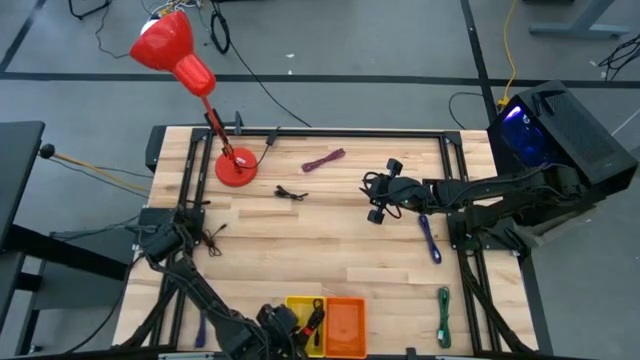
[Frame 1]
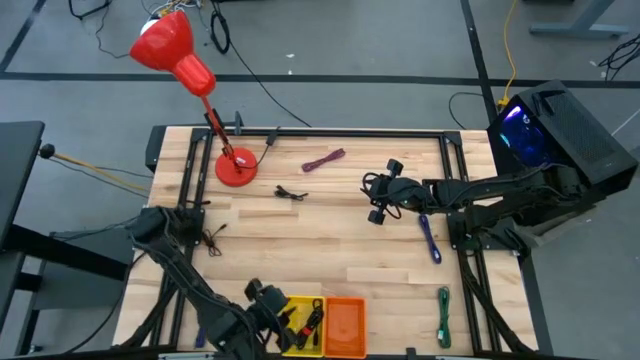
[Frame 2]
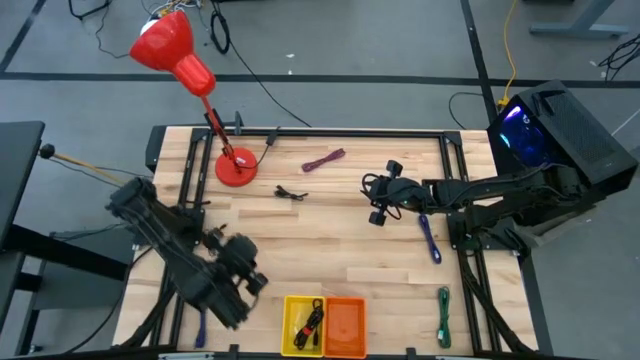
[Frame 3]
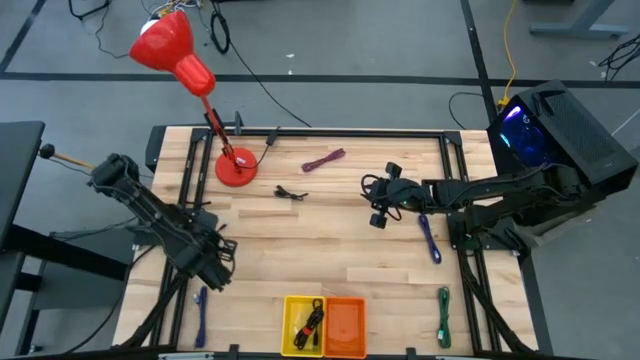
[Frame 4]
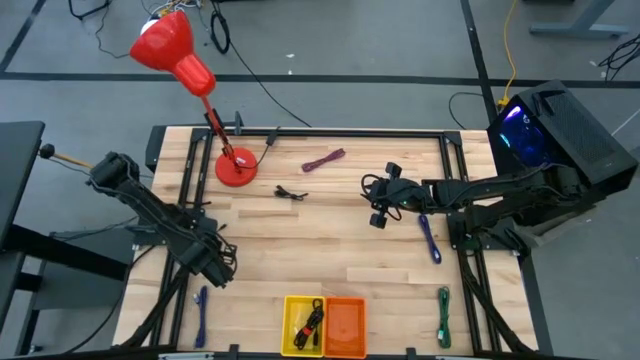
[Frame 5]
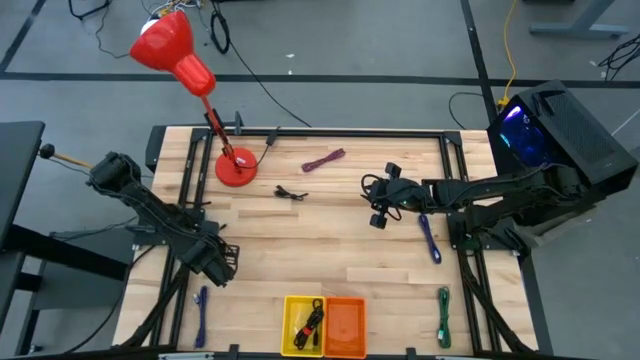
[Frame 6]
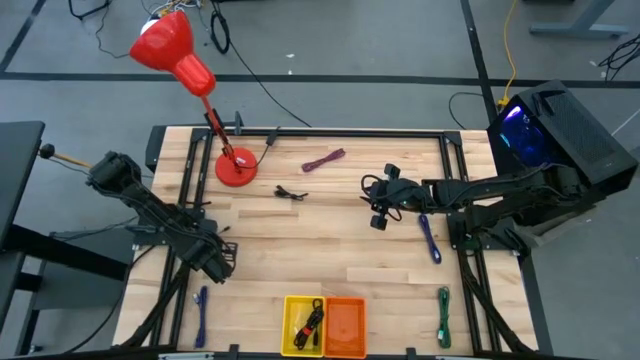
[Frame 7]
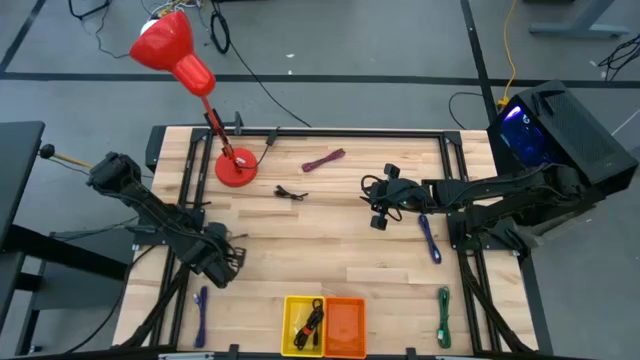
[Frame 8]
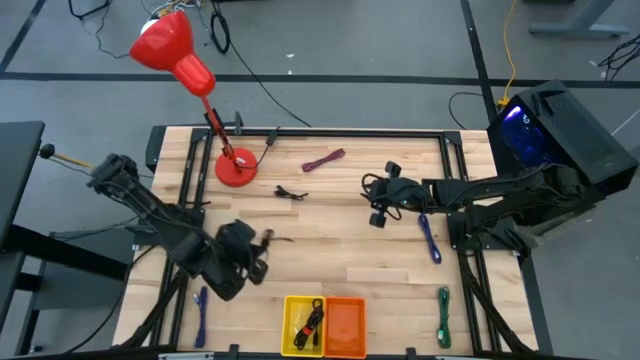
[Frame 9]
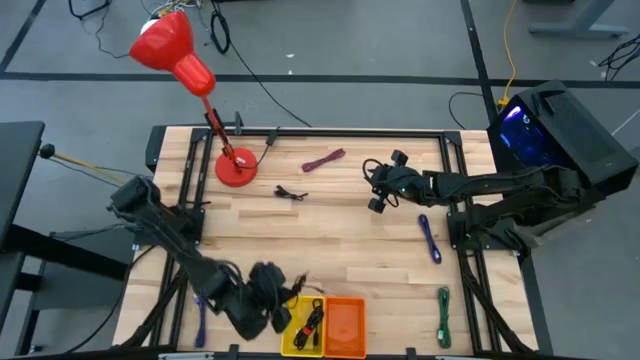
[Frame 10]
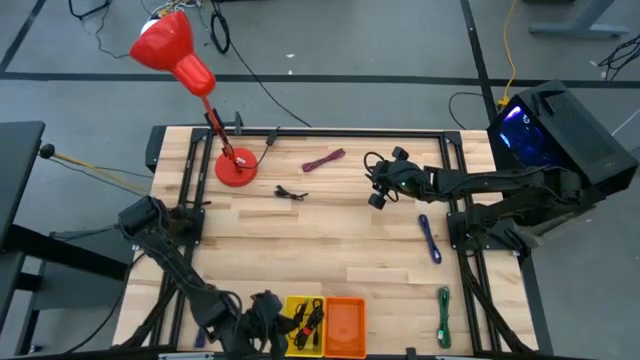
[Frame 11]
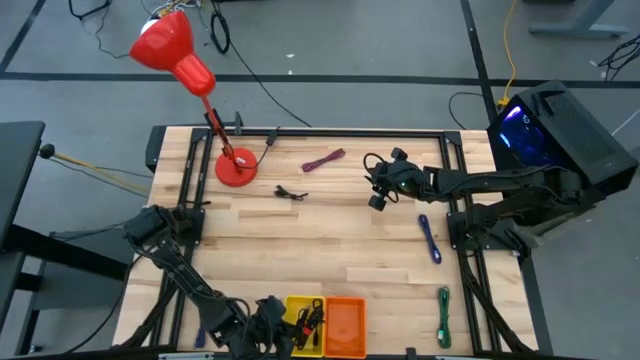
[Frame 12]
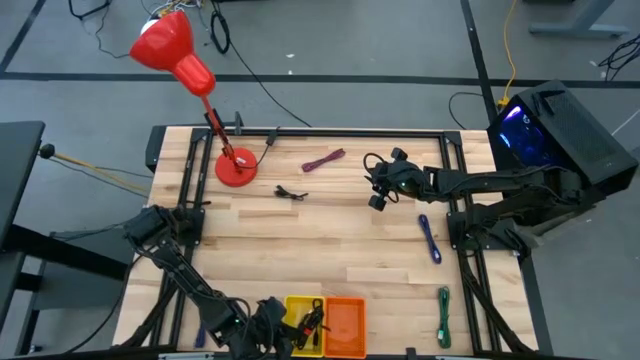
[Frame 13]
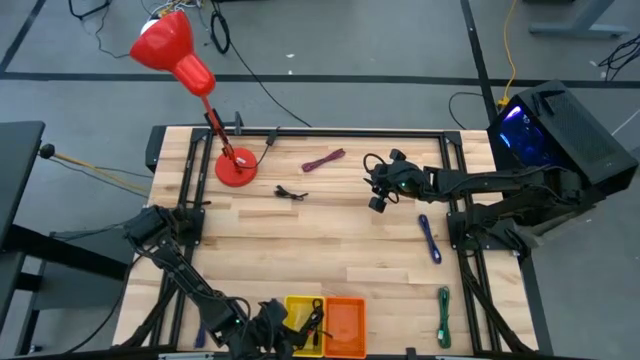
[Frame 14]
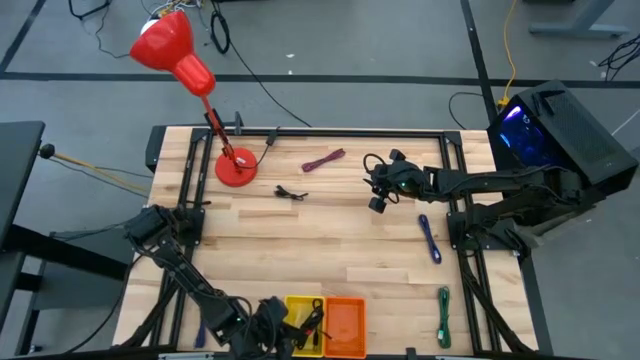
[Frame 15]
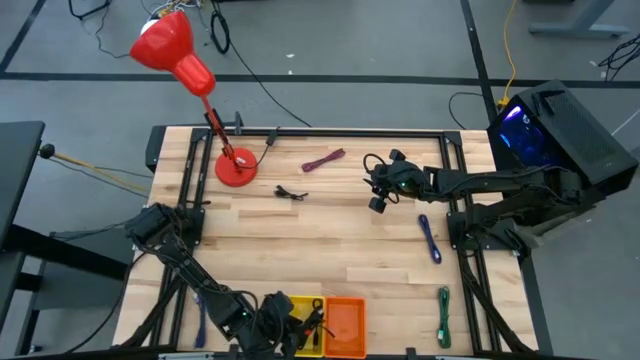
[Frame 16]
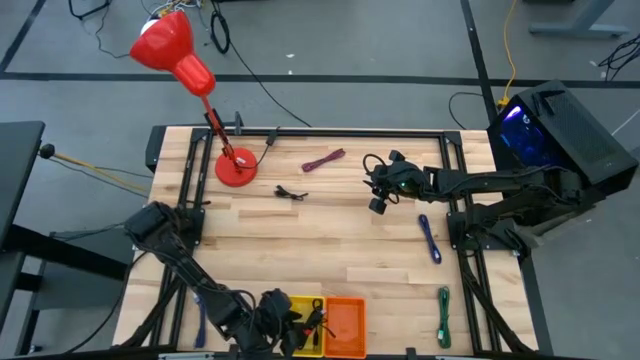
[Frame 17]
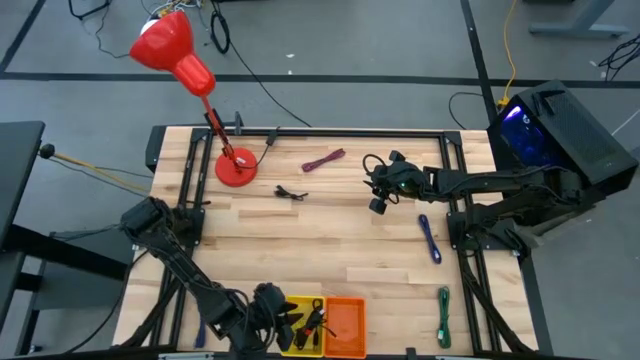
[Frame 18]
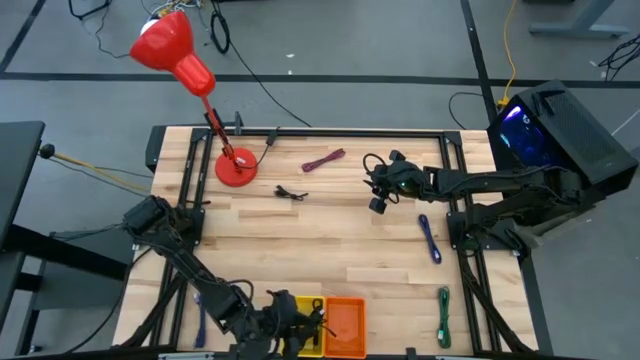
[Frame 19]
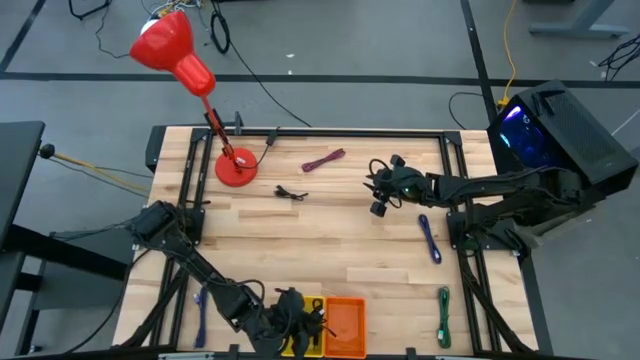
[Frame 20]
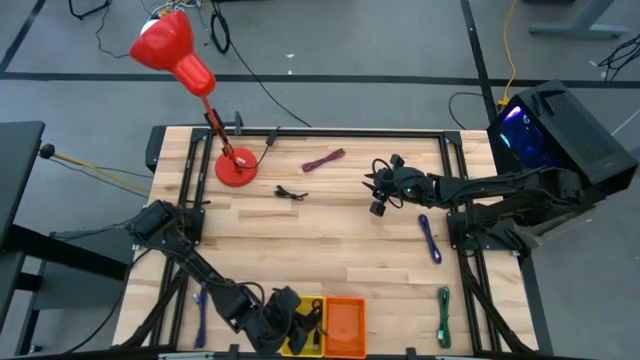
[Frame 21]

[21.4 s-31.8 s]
Task: Pick & Place USB Port
Put the black charger cable into the yellow bin

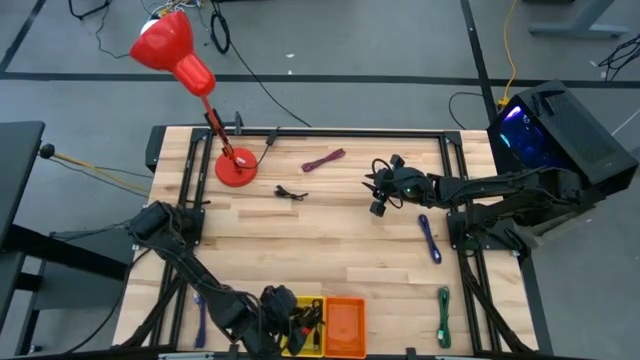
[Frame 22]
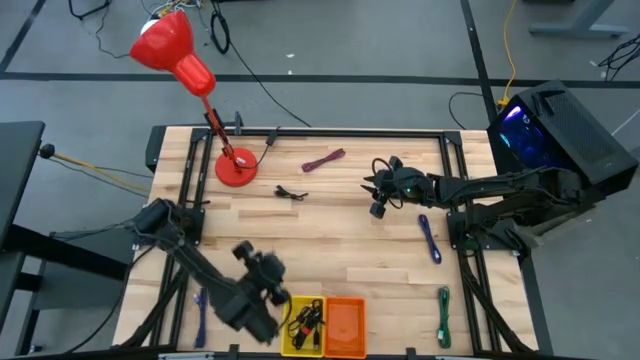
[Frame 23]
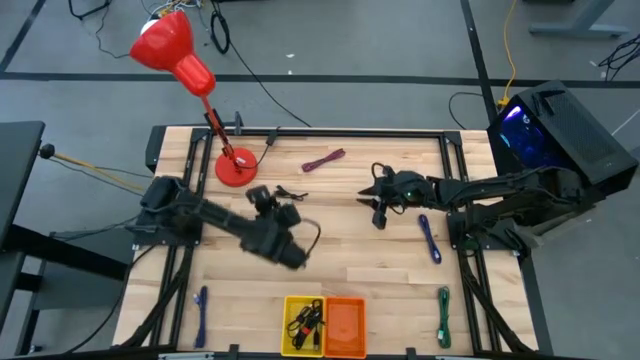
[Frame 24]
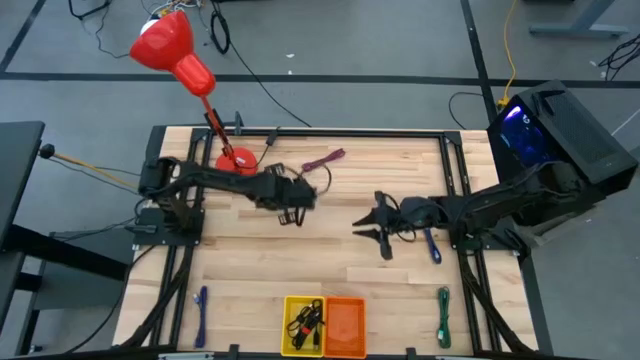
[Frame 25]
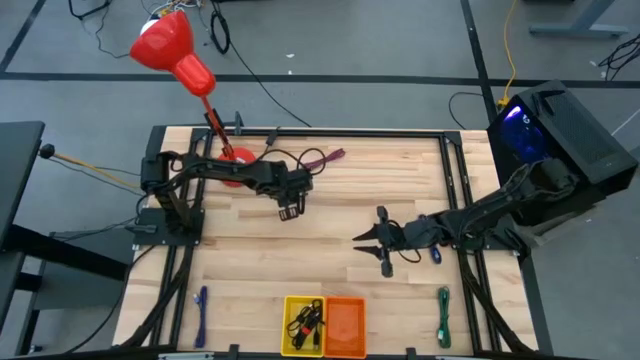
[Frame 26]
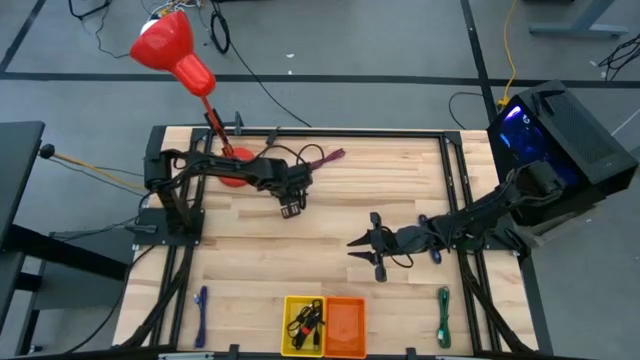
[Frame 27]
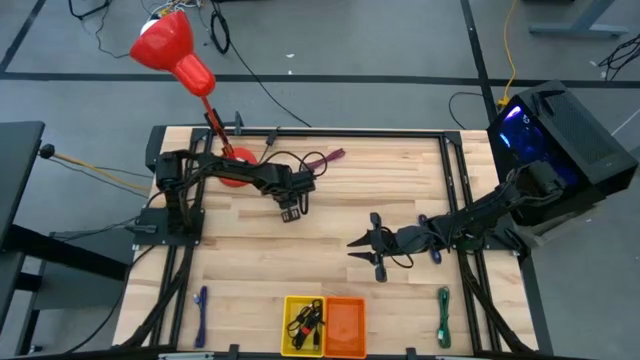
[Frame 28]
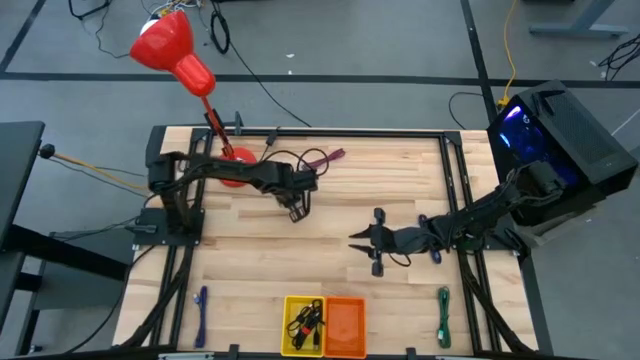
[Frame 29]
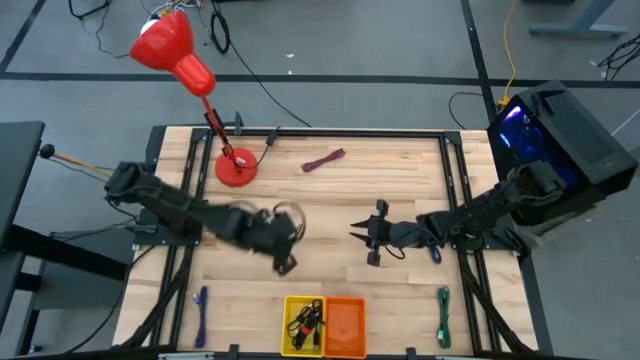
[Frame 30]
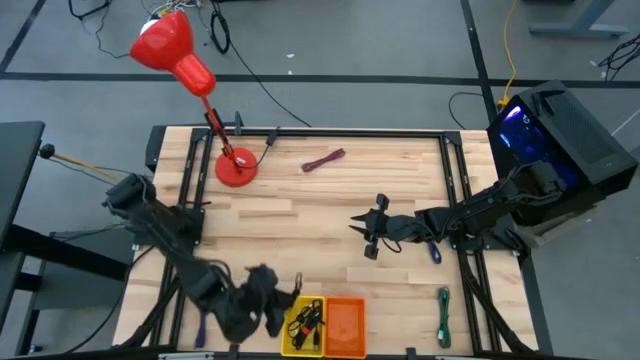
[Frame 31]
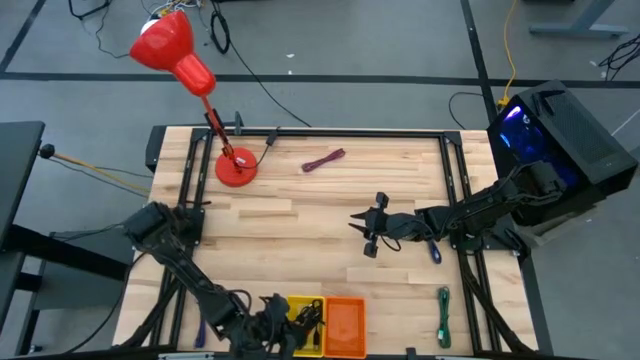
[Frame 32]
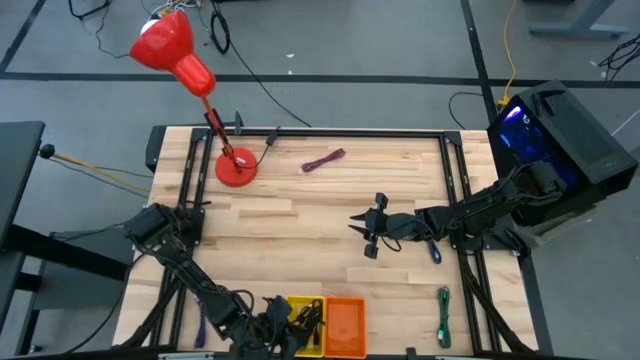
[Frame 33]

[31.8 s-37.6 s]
Put the black charger cable into the yellow bin

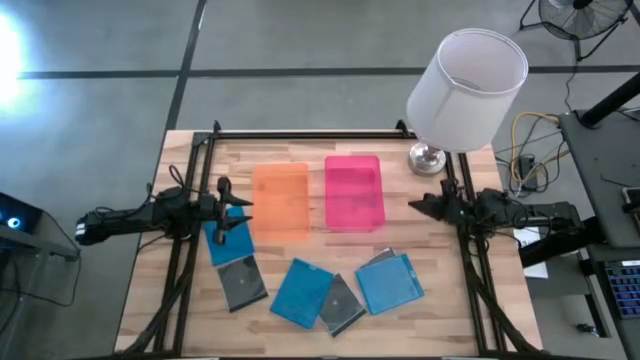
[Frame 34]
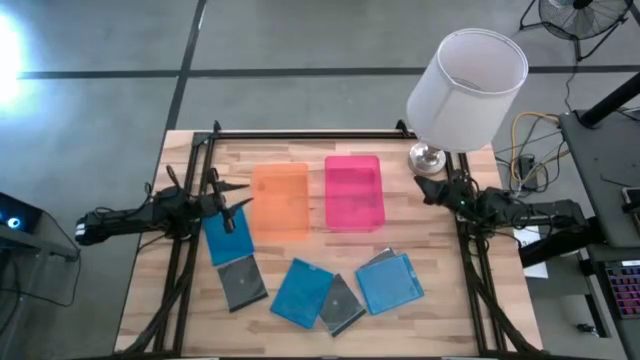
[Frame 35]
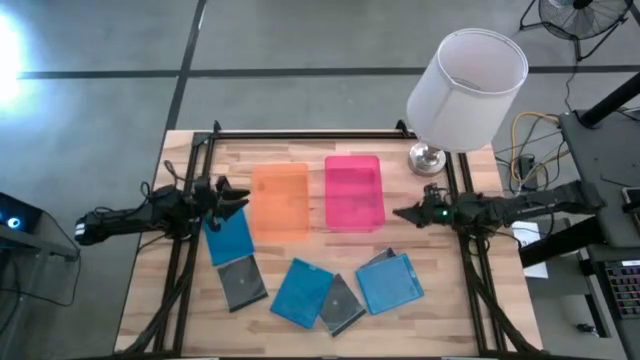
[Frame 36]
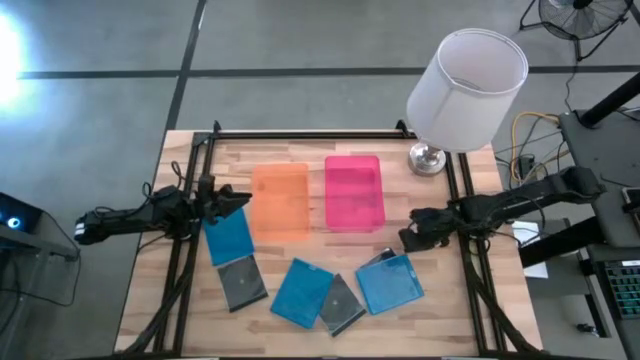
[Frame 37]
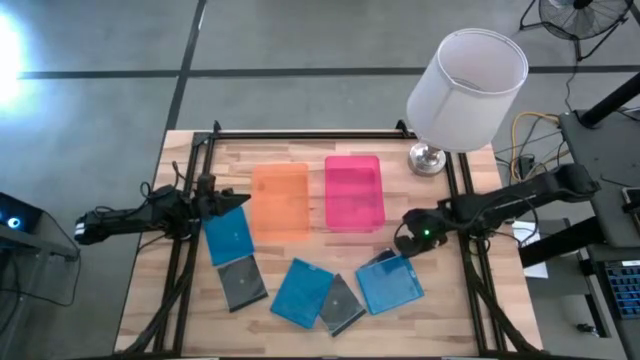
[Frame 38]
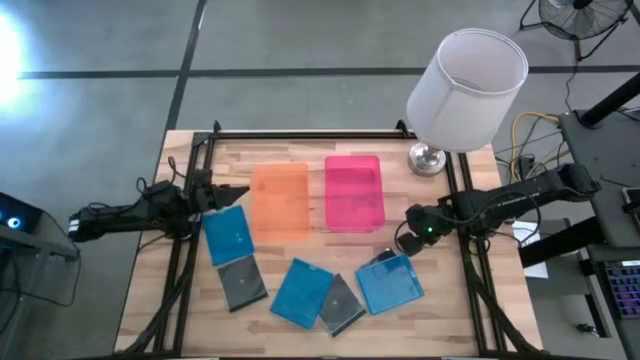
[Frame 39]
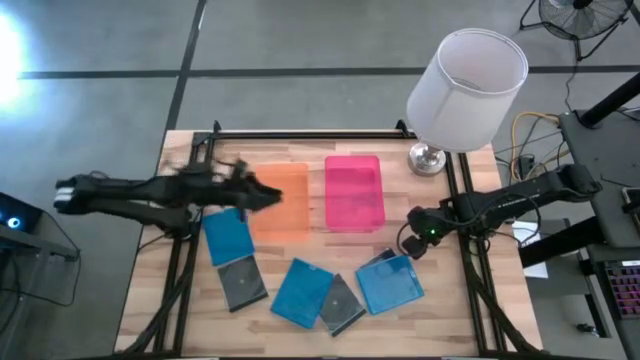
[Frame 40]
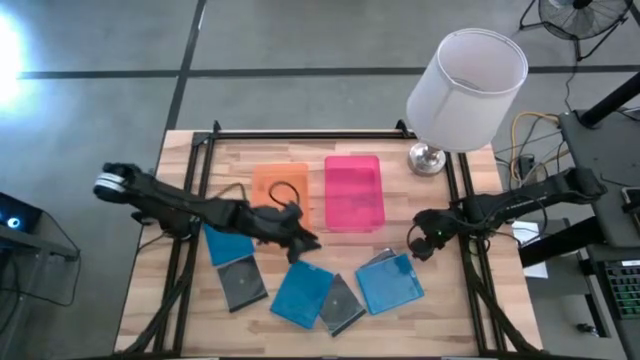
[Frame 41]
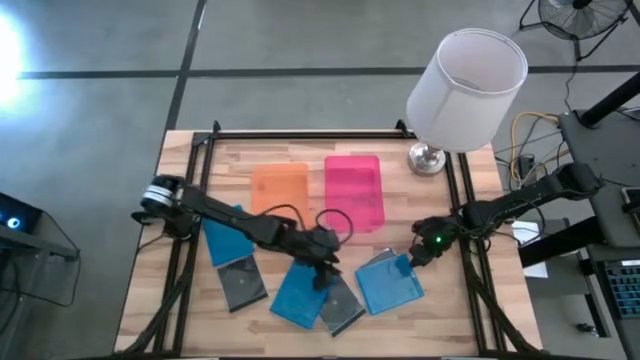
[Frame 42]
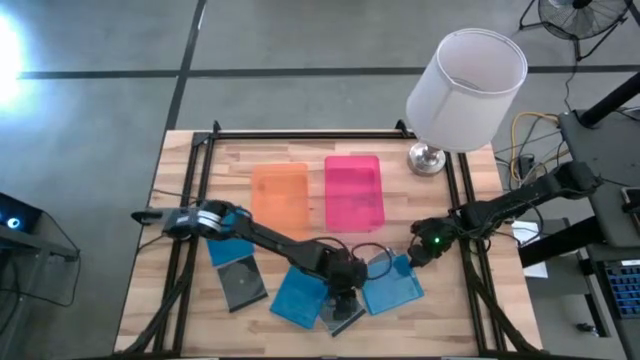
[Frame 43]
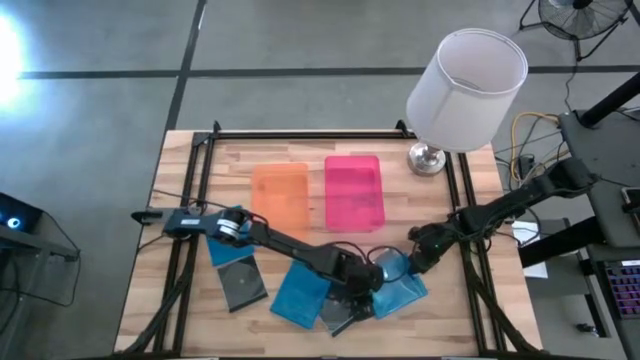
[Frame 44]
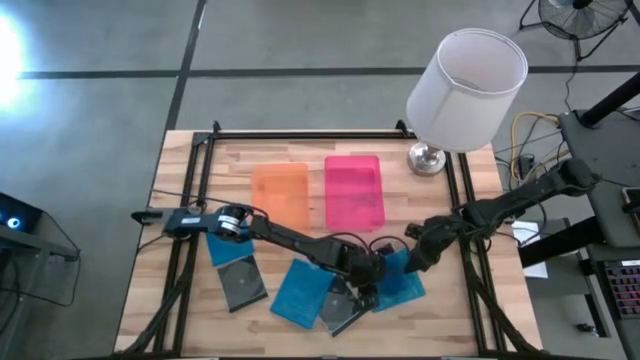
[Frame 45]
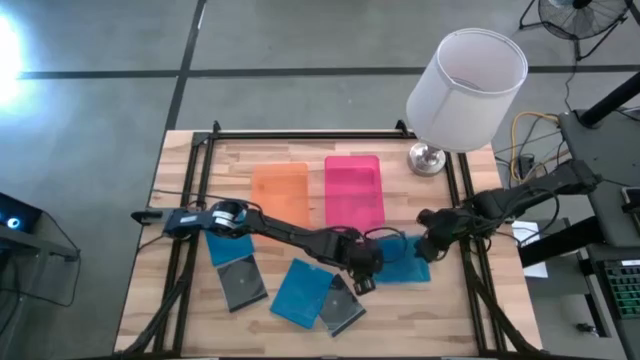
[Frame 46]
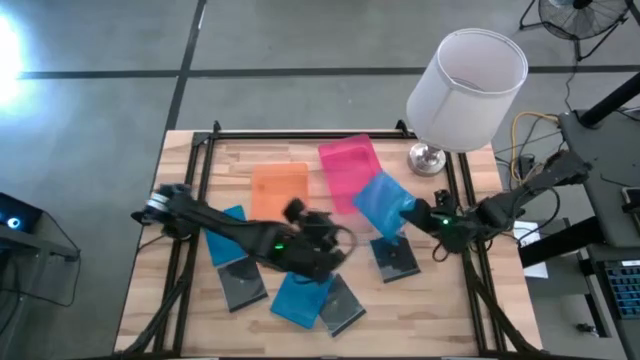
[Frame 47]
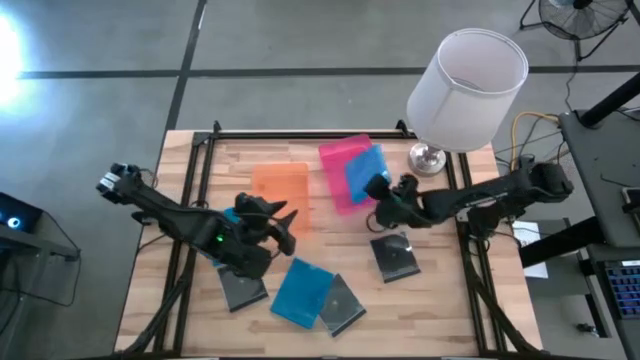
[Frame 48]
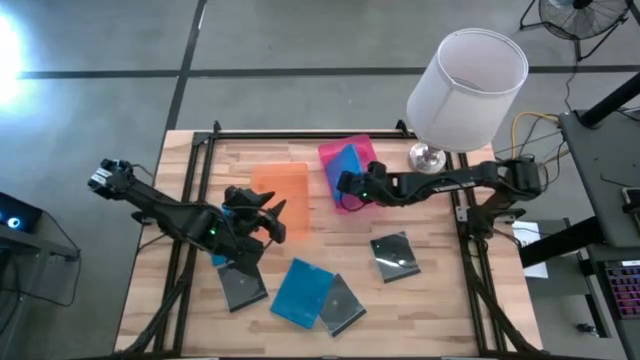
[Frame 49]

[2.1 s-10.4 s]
Task: Pick & place jewel cases by type
Put the bottom right blue cd case into the pink bin
